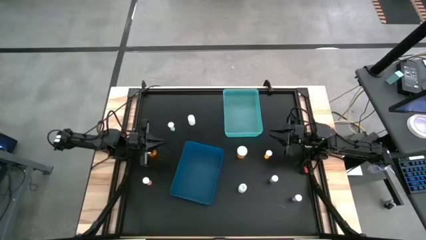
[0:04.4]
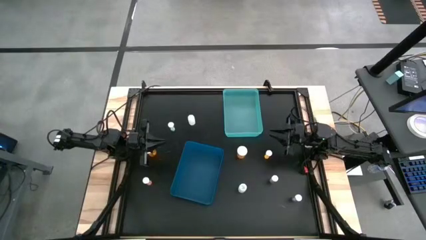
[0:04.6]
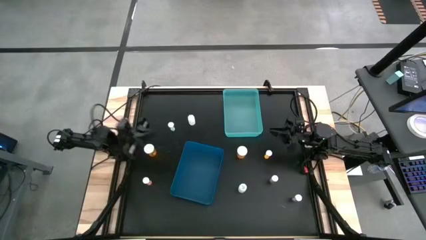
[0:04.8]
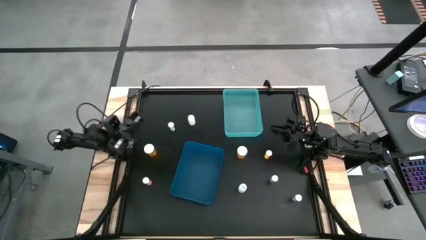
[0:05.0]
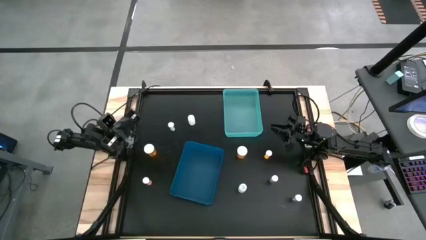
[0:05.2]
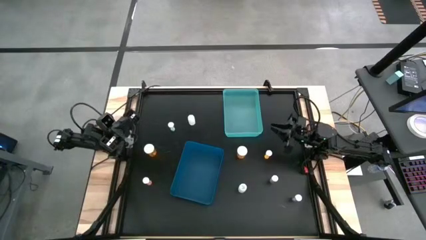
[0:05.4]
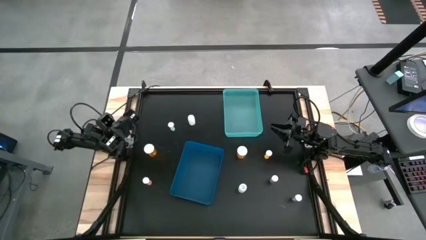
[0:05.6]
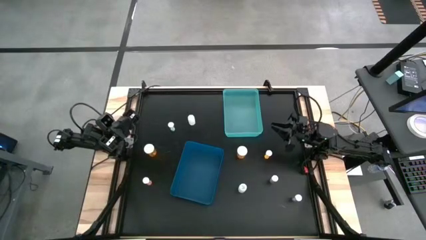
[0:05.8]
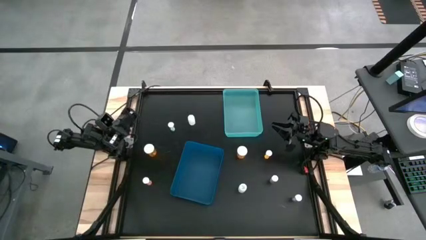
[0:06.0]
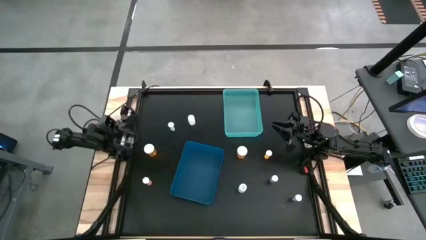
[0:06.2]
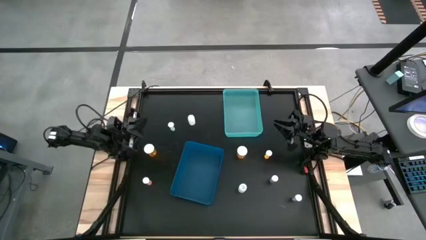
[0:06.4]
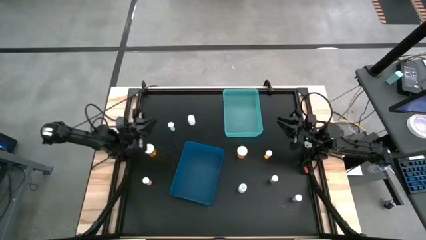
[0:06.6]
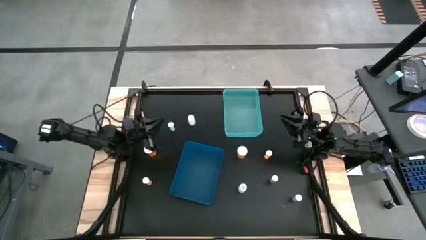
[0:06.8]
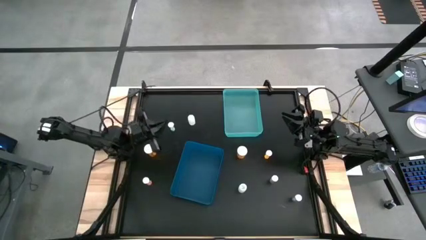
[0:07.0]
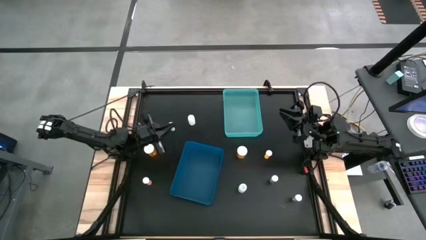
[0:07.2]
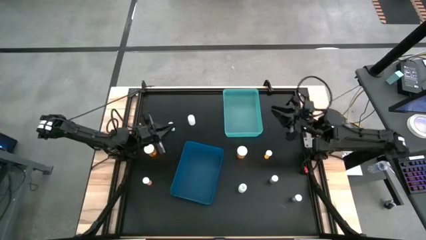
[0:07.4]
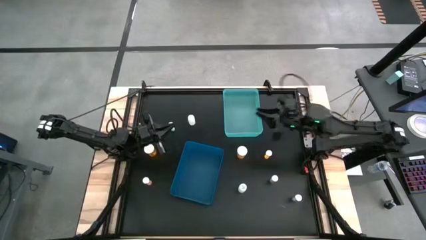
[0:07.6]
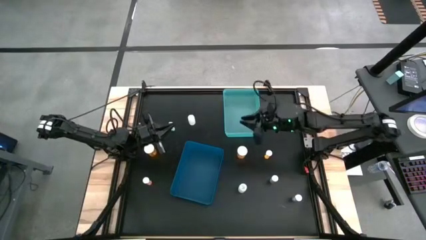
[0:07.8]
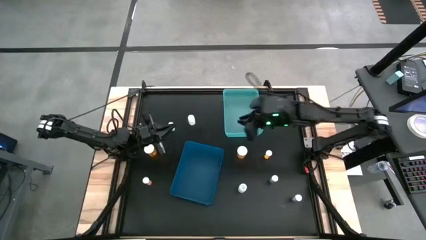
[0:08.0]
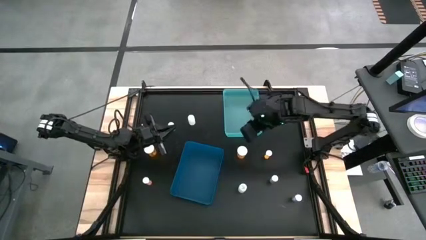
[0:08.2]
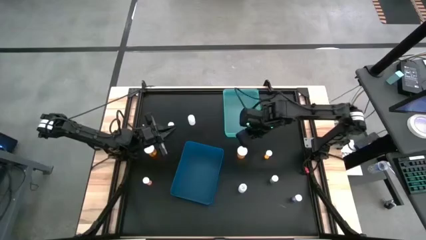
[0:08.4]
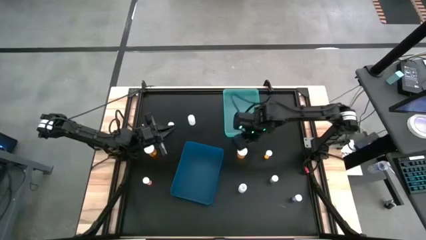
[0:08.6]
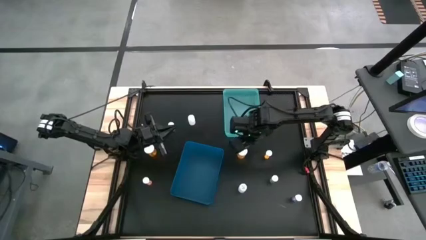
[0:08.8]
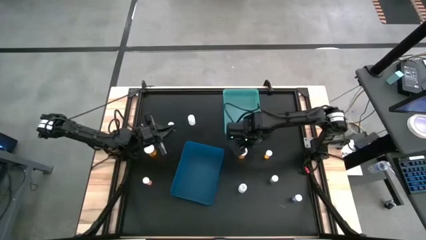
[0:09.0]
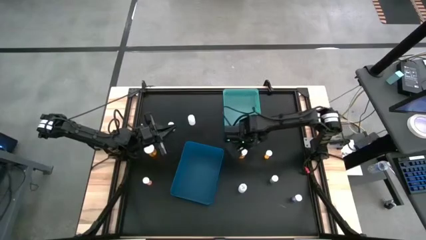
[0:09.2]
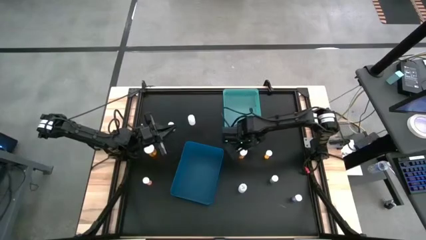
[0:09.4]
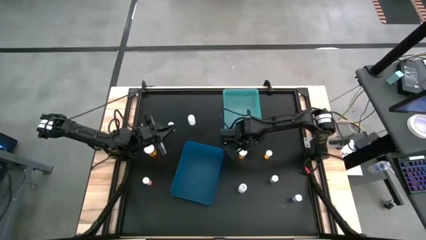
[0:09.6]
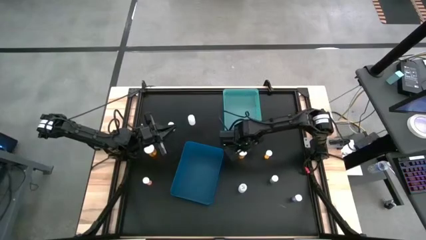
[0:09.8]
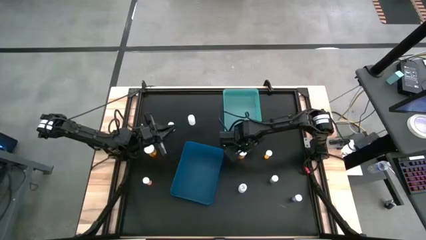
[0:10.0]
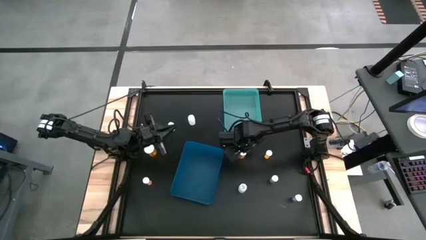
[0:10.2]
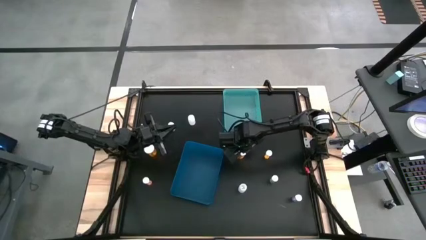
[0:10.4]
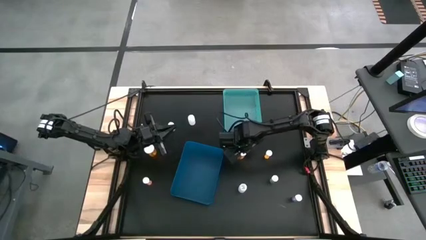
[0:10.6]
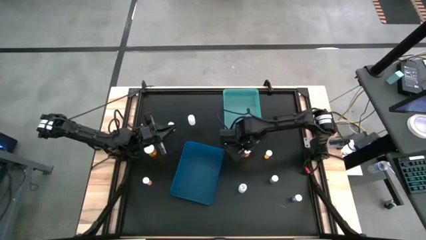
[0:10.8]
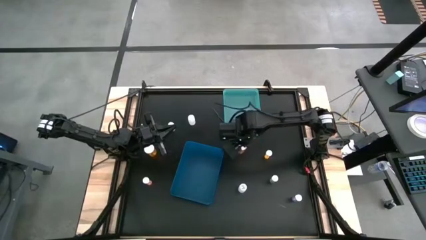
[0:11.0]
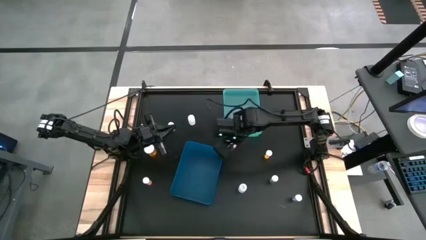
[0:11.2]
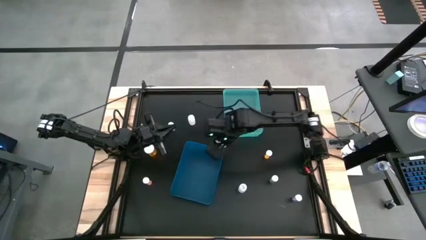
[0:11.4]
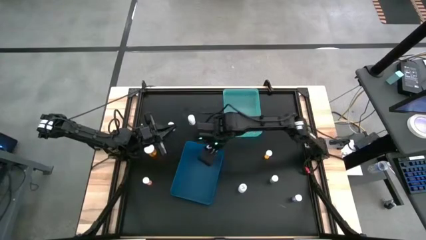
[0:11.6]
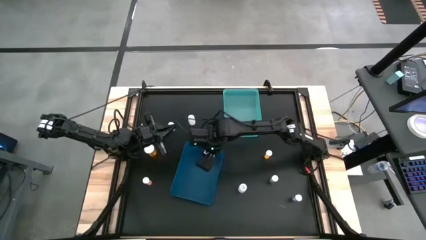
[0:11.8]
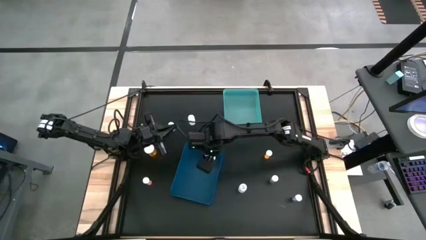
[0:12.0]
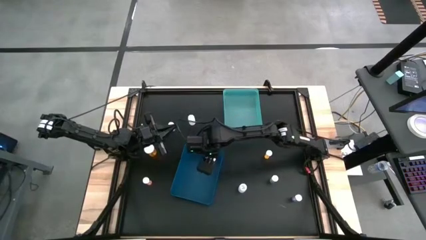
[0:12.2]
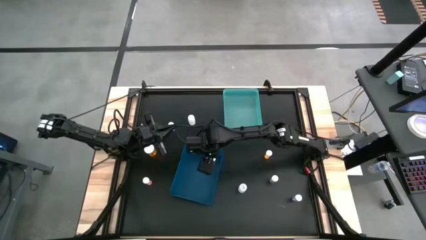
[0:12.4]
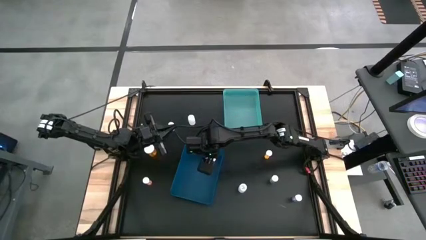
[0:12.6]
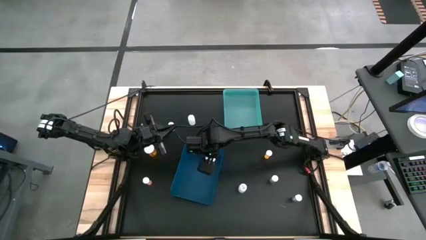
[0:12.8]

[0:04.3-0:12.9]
Task: Pick and place medicine bottles into bin by pill shape (circle, oval)
Put the right orange capsule bottle into the blue bin

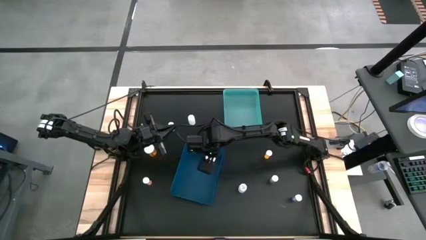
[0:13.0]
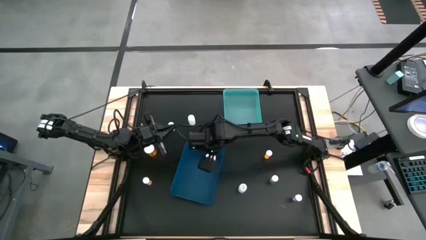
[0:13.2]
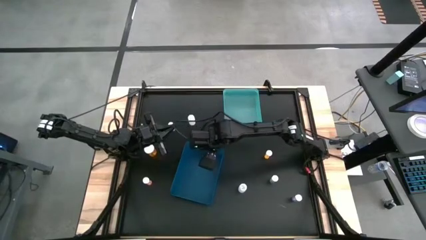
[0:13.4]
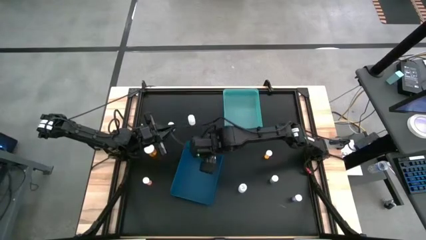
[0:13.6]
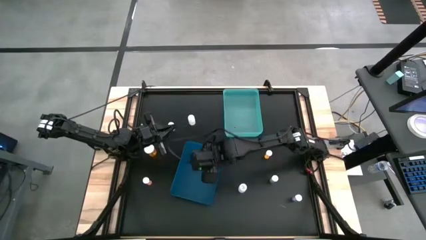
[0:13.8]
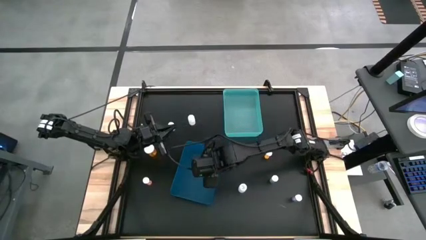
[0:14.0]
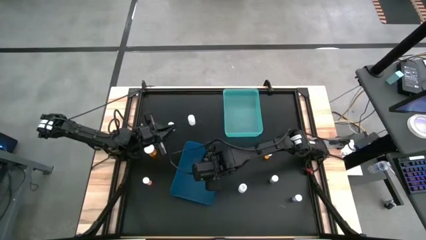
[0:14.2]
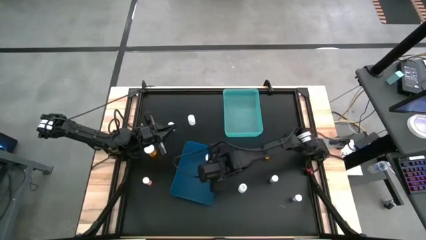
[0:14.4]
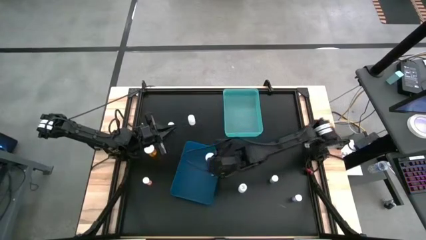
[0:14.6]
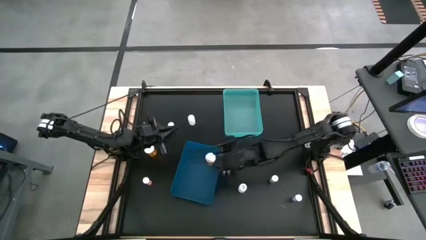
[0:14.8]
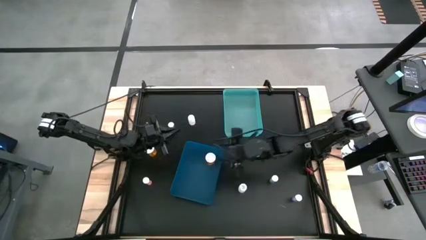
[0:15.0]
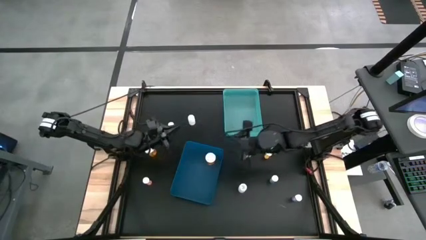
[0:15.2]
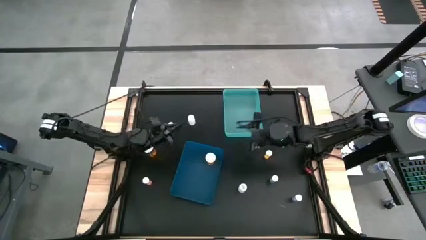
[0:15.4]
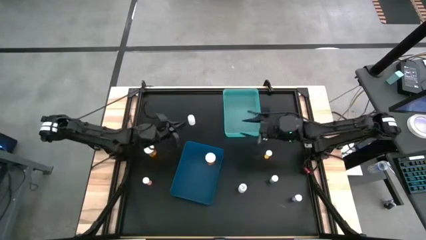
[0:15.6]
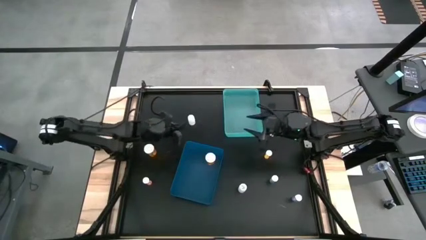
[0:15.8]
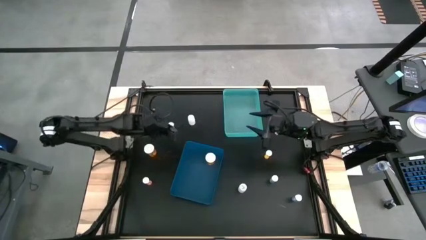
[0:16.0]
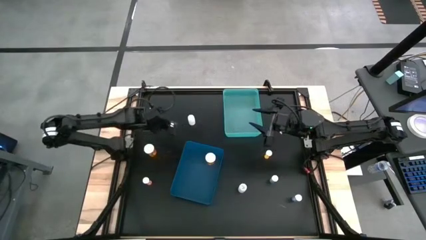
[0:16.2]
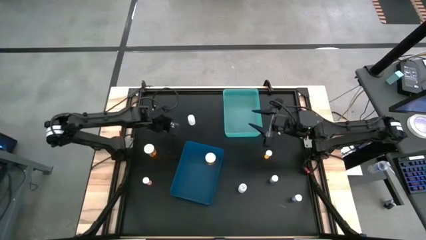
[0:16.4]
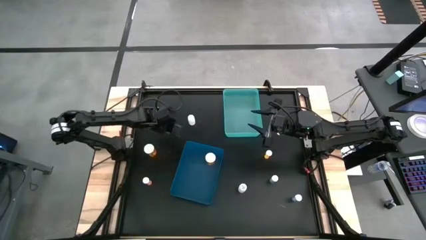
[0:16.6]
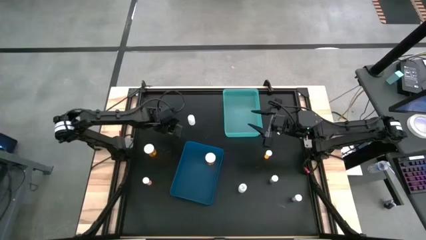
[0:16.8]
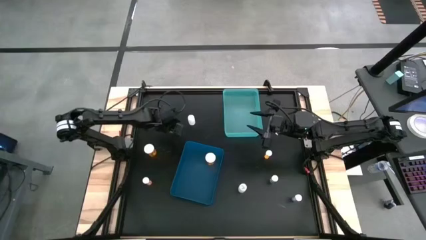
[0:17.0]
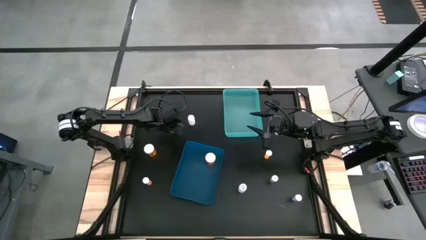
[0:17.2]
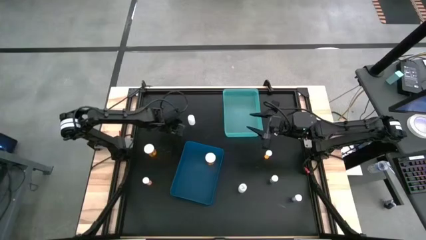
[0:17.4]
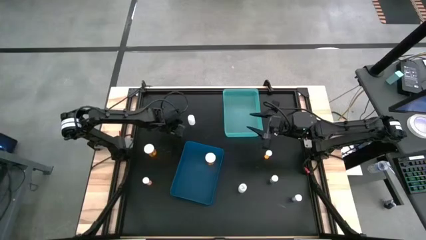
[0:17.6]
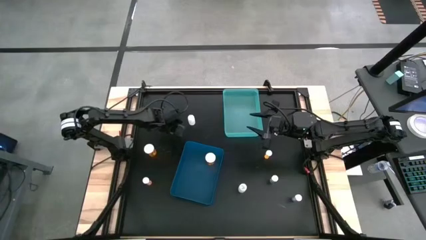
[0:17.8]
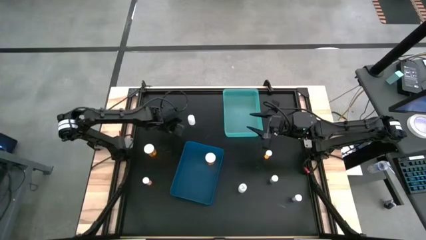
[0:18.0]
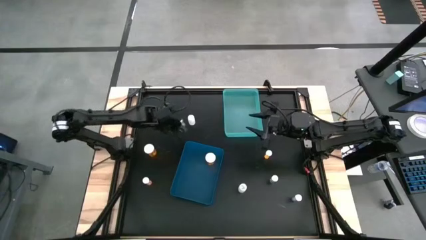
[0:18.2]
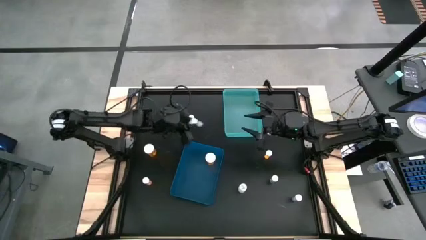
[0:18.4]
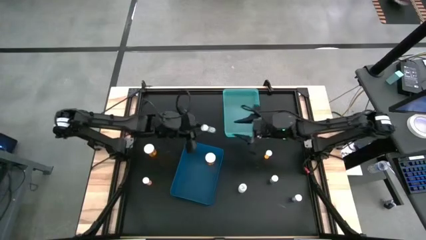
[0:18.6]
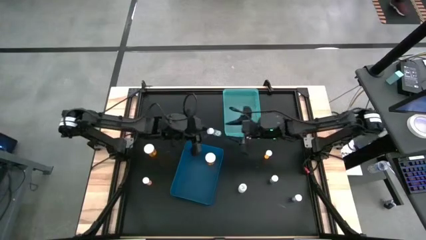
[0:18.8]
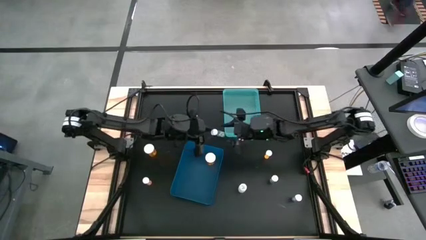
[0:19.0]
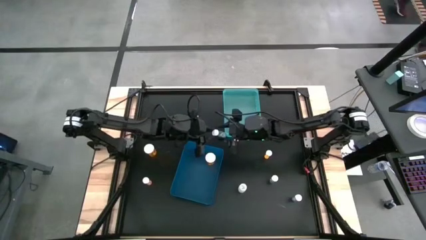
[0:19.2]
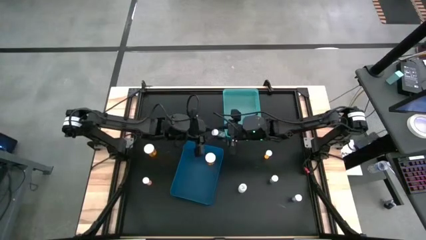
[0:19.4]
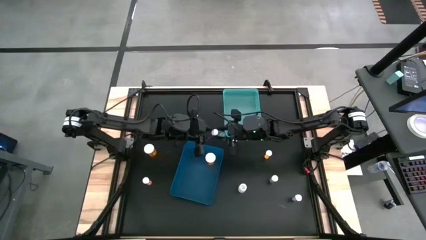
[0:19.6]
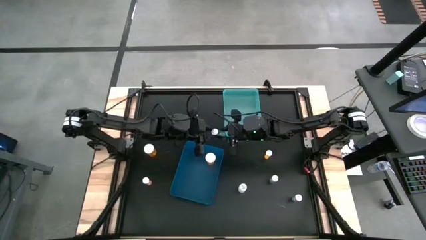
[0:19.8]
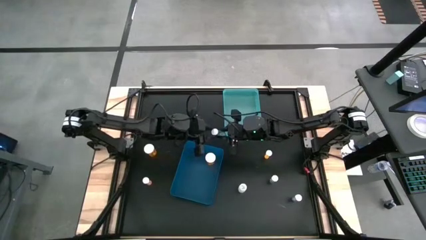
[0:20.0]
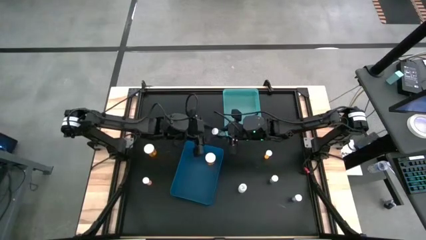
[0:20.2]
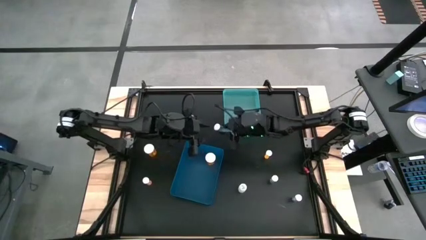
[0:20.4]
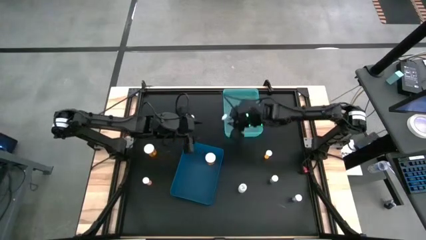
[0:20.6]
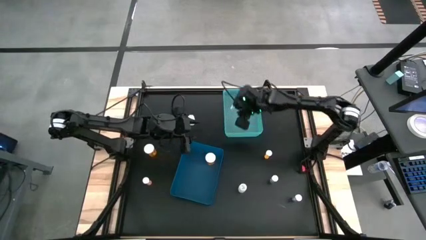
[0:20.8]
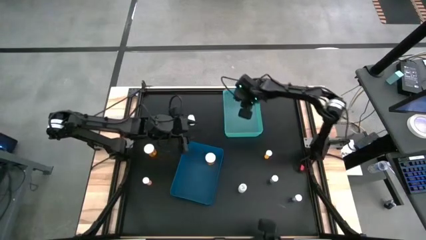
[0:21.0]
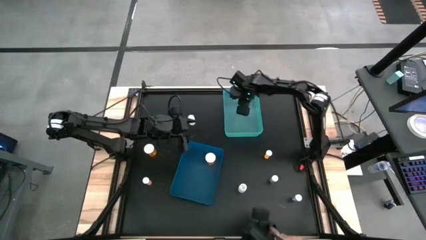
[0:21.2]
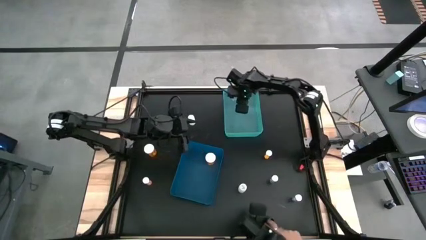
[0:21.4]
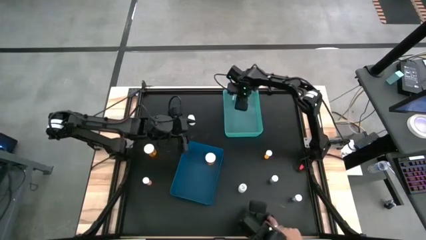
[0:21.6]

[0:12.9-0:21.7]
Put the green tablet bottle into the green bin
